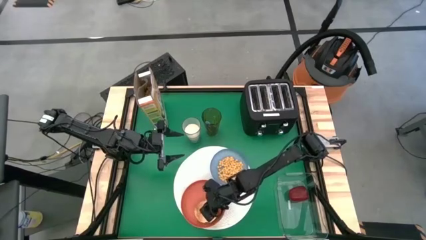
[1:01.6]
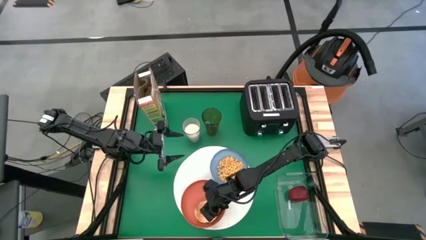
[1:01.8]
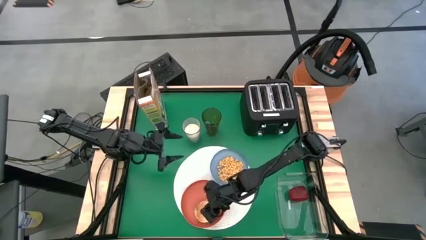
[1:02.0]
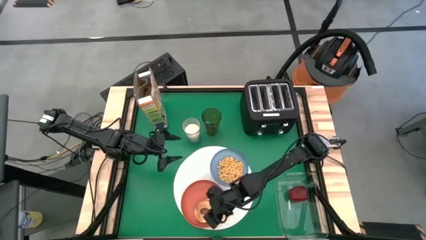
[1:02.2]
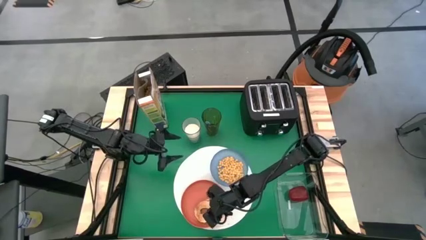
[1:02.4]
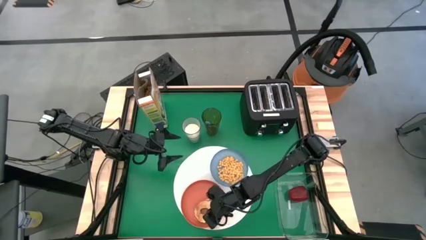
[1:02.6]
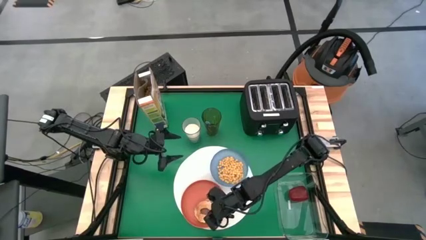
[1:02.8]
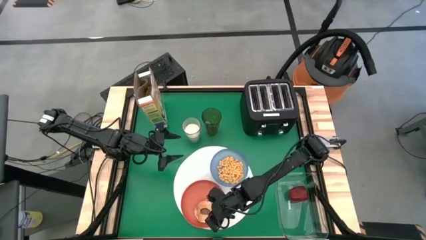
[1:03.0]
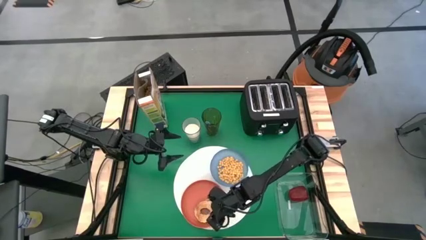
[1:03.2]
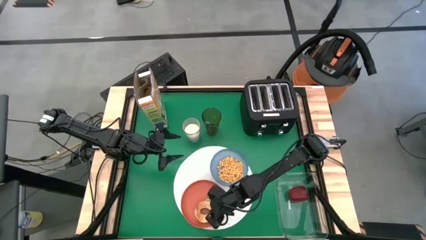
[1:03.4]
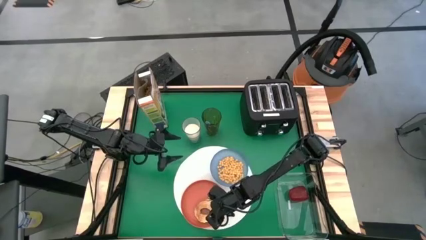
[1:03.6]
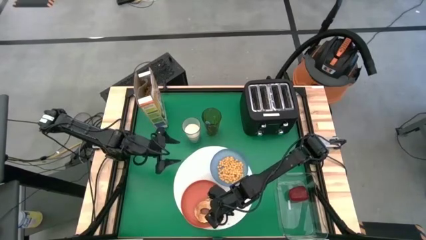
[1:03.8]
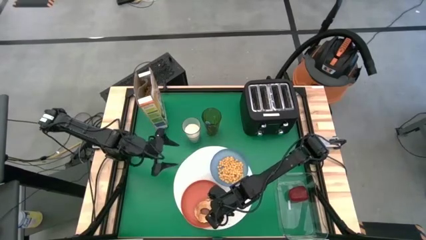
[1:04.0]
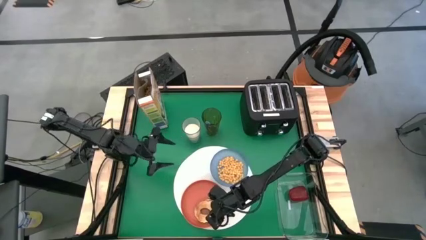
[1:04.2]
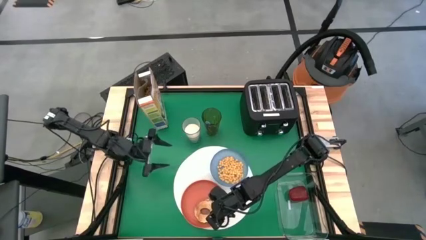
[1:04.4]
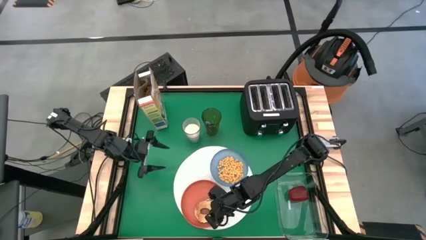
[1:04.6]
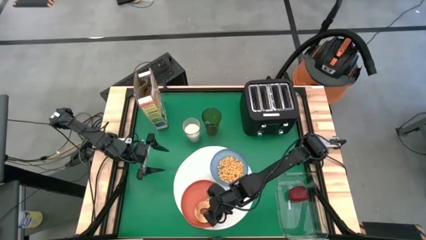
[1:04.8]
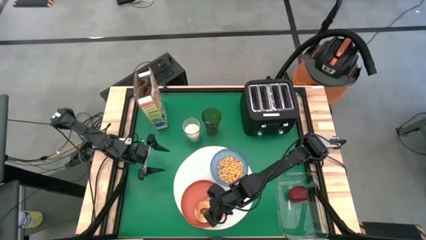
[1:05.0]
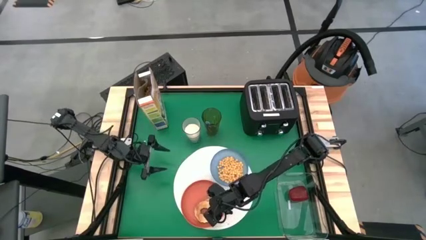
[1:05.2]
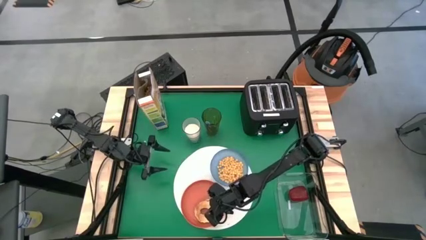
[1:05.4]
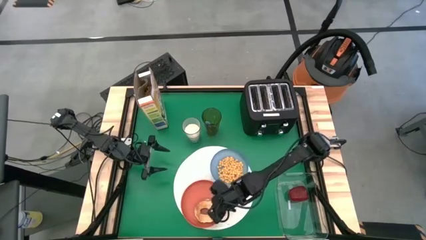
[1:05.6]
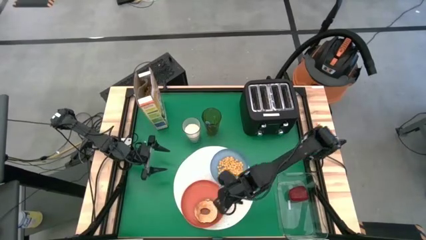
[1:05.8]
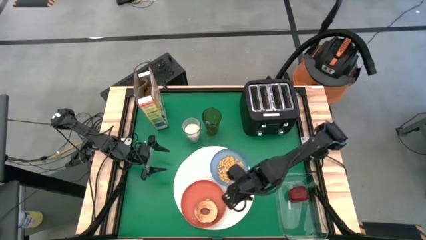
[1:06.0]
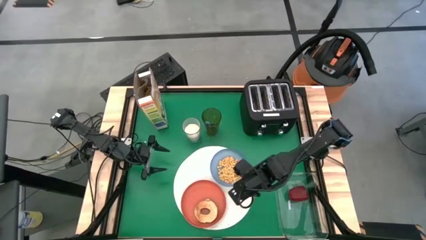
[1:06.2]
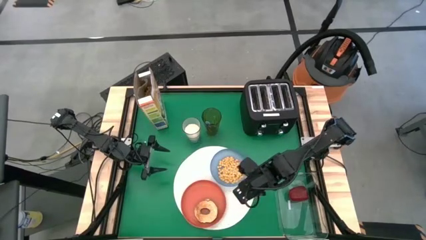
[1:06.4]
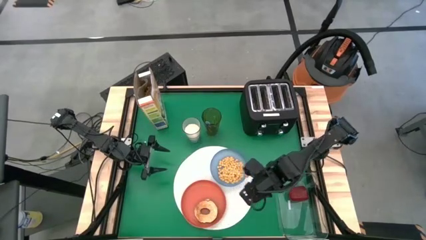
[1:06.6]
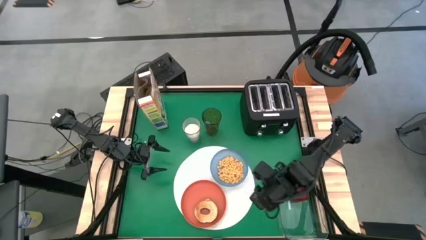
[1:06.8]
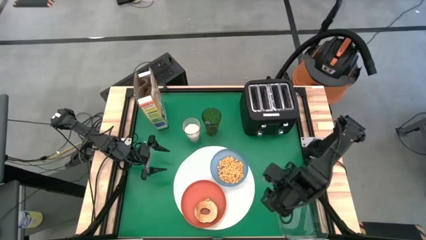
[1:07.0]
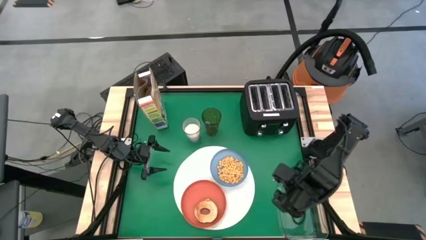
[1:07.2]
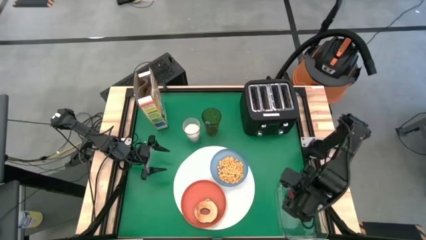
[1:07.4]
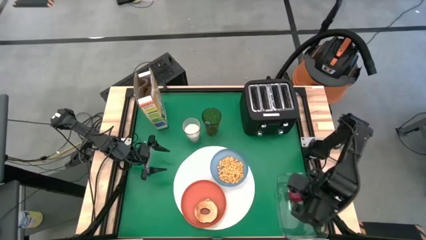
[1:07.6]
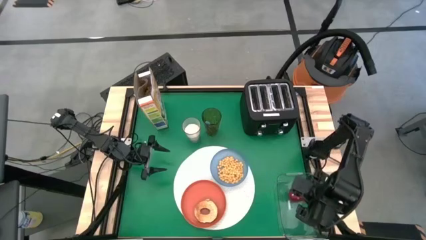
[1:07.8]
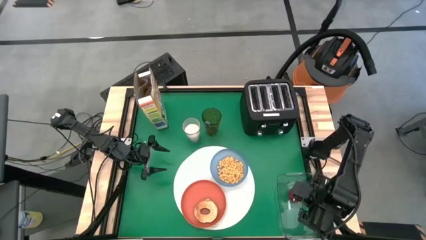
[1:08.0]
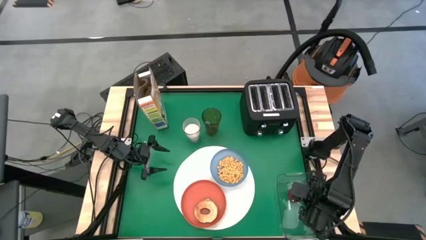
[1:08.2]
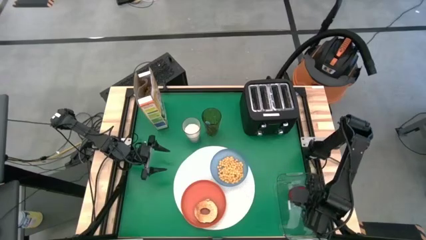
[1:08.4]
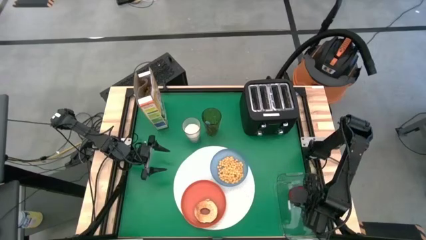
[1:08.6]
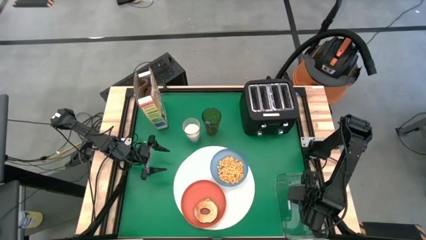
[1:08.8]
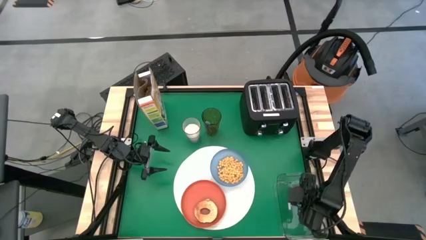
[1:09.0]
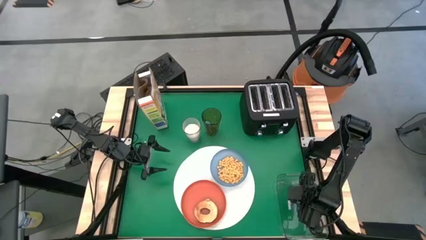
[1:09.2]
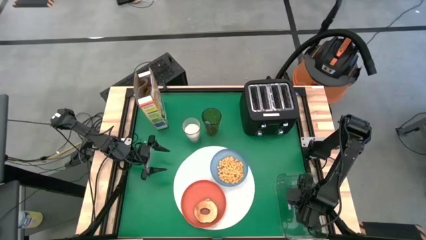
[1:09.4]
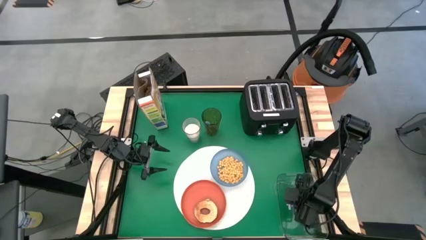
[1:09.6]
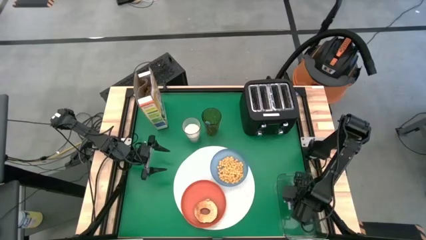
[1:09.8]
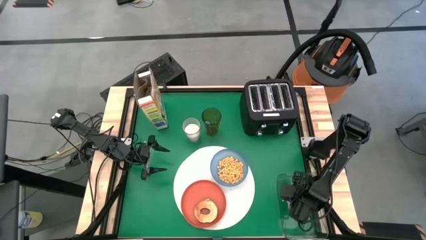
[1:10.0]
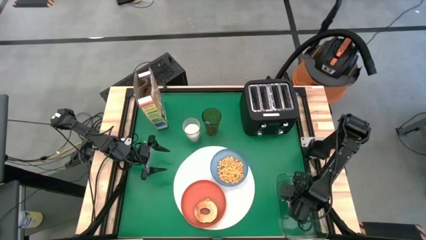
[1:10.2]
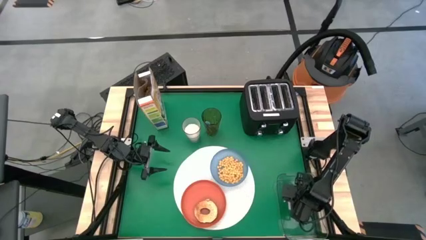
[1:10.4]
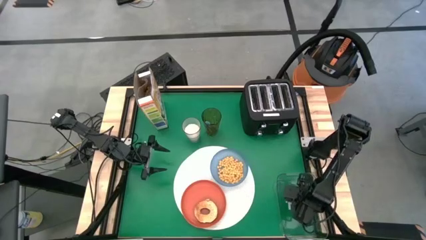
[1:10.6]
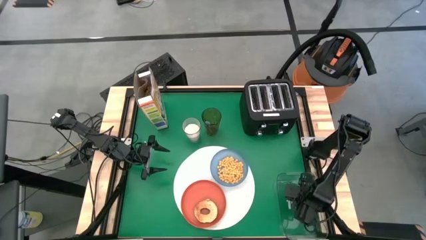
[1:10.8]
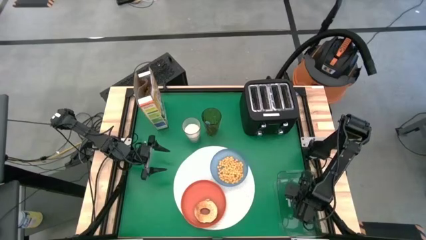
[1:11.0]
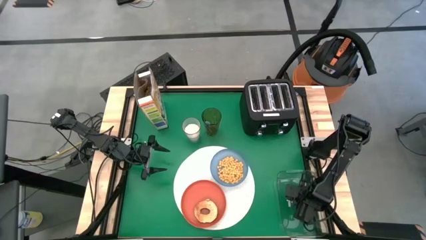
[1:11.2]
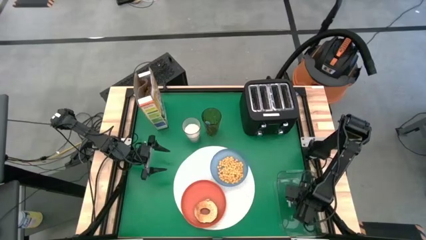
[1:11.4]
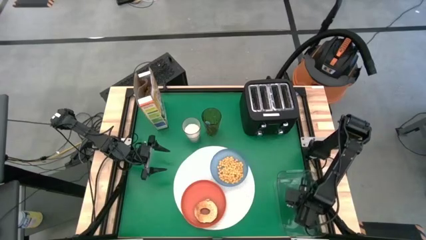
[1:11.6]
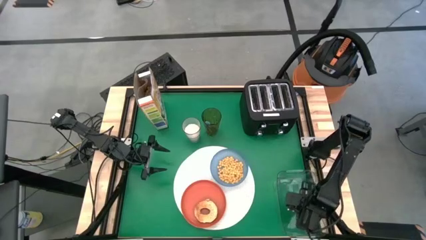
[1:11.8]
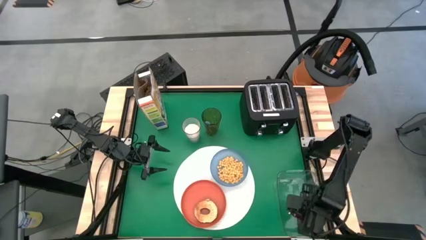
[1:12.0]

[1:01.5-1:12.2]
Task: Arrange a breakfast setting
Put the red apple from the transparent bin on the orange plate
